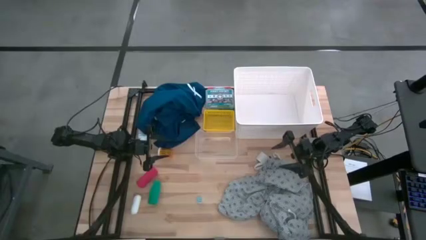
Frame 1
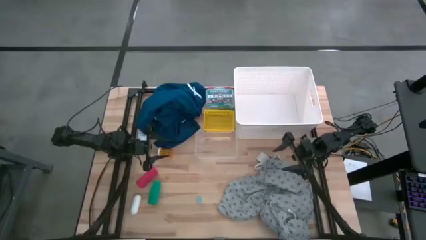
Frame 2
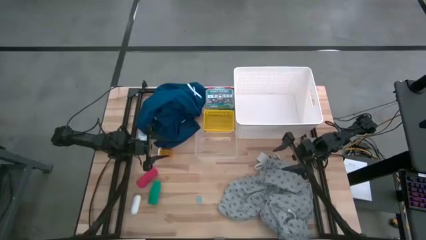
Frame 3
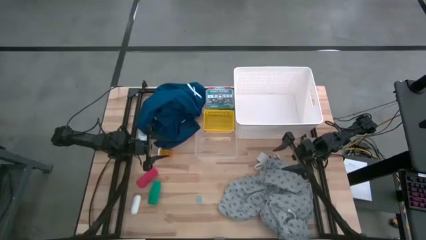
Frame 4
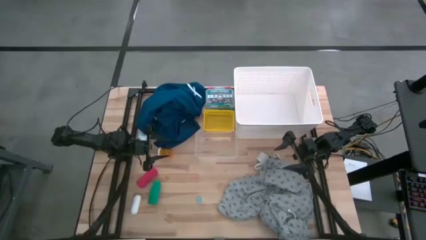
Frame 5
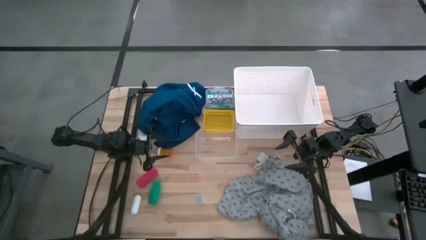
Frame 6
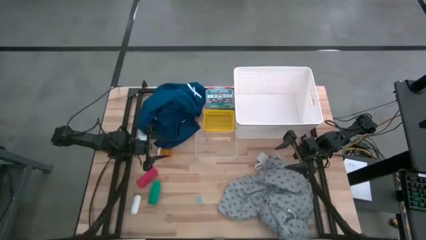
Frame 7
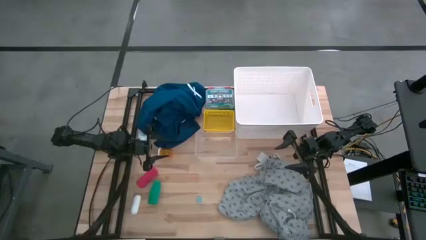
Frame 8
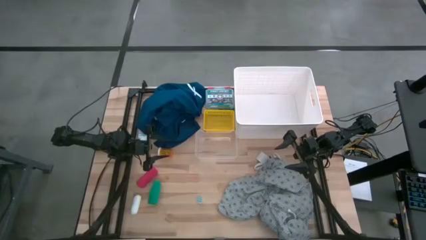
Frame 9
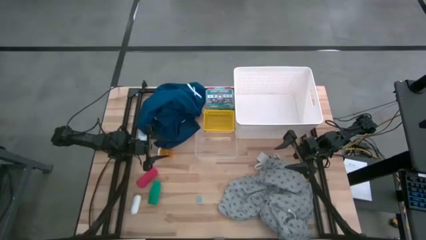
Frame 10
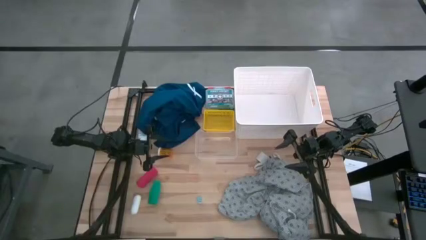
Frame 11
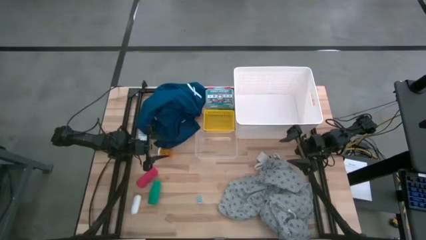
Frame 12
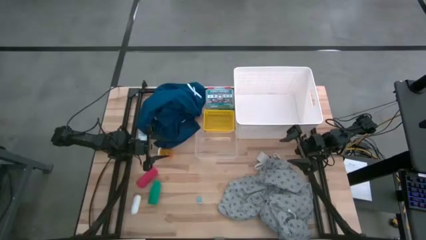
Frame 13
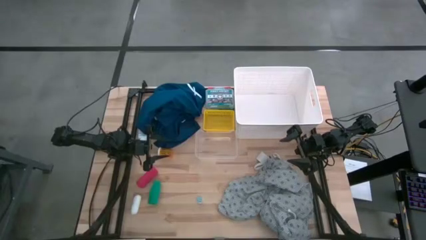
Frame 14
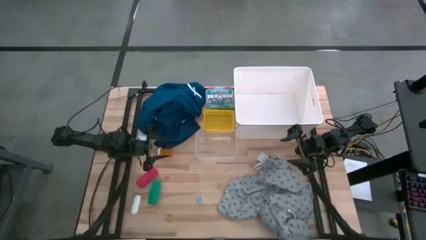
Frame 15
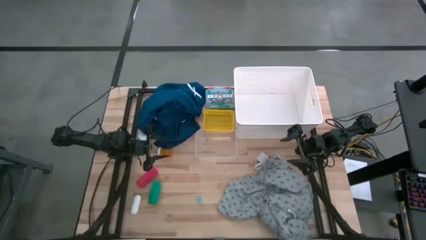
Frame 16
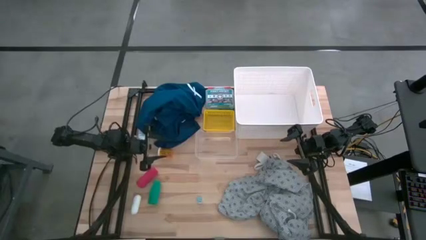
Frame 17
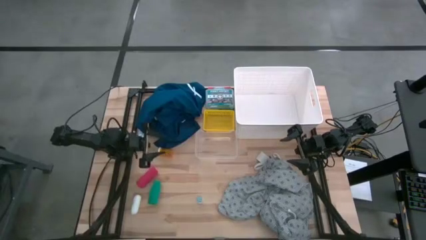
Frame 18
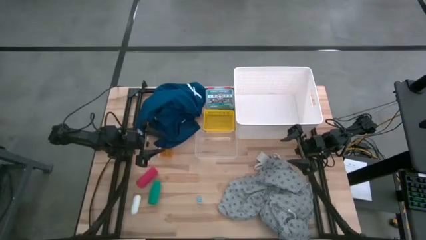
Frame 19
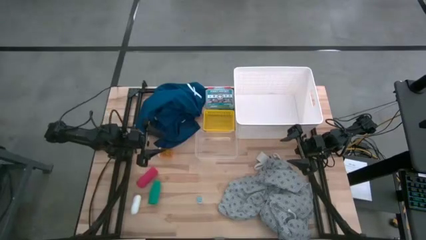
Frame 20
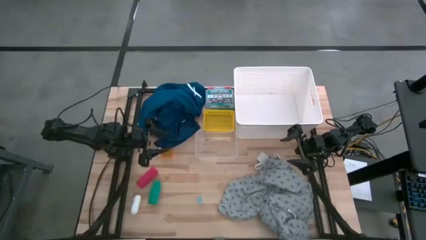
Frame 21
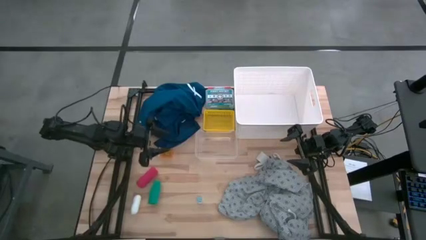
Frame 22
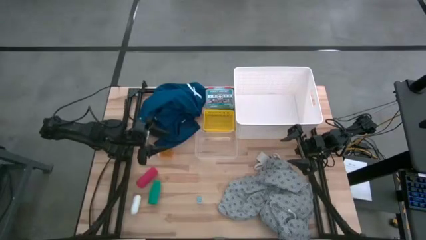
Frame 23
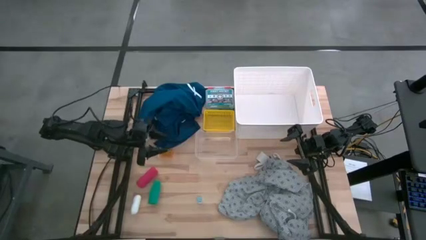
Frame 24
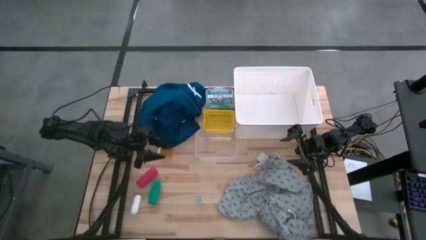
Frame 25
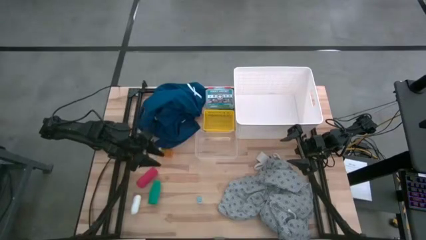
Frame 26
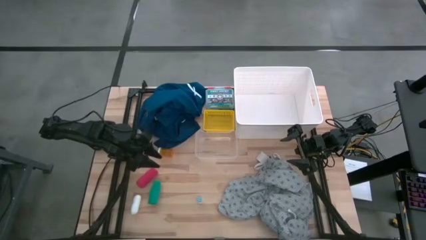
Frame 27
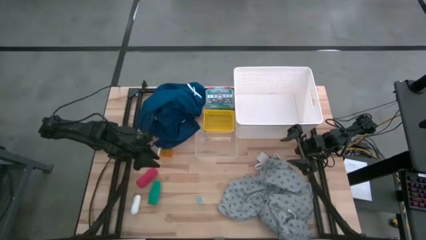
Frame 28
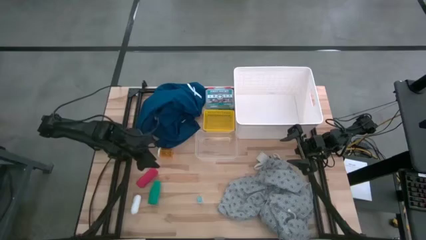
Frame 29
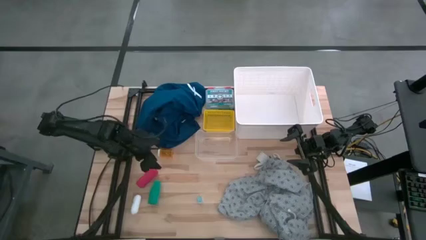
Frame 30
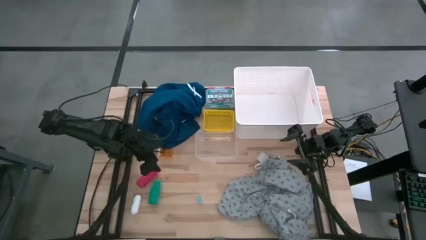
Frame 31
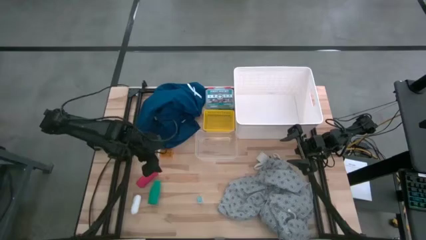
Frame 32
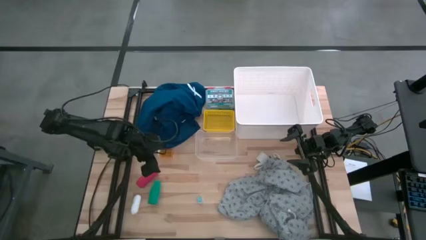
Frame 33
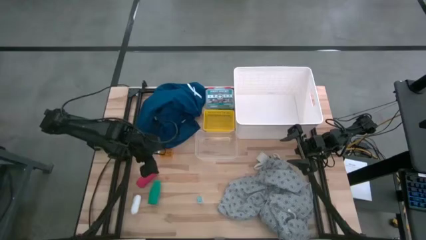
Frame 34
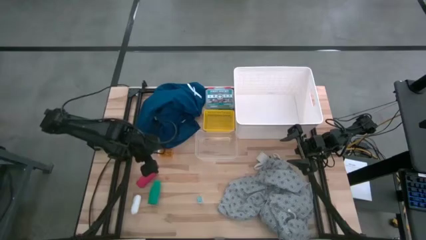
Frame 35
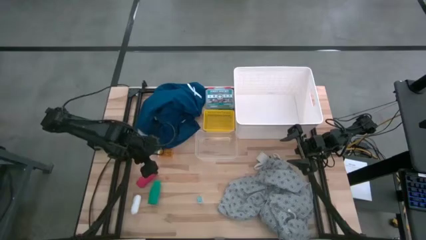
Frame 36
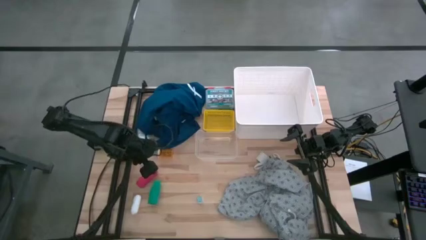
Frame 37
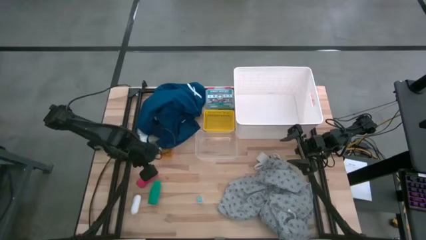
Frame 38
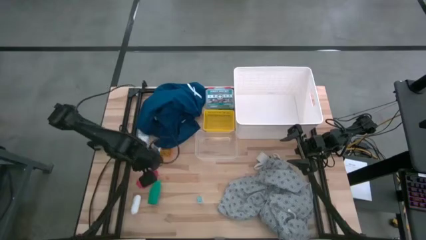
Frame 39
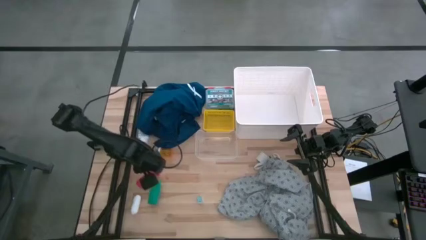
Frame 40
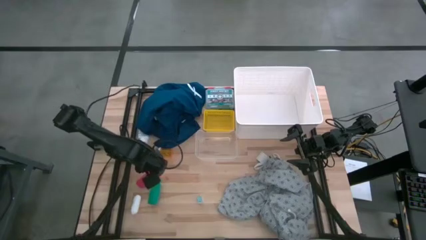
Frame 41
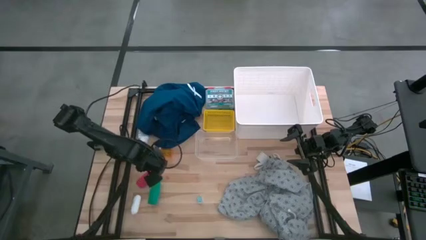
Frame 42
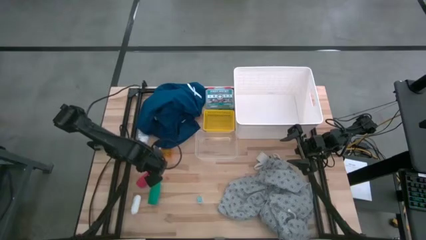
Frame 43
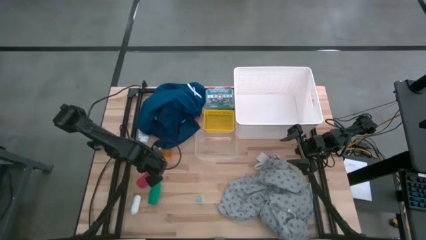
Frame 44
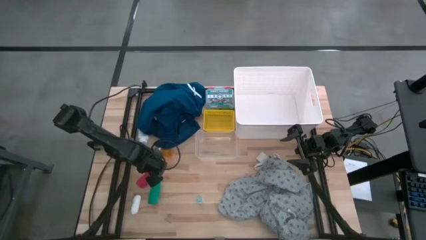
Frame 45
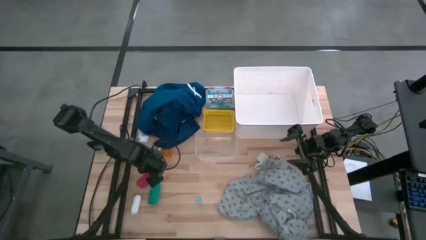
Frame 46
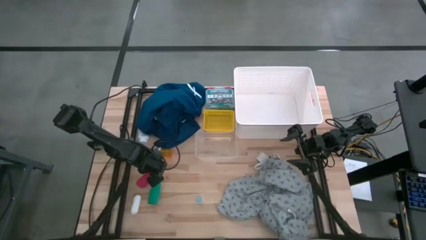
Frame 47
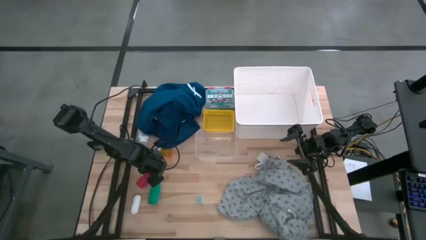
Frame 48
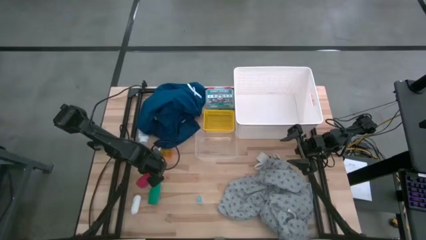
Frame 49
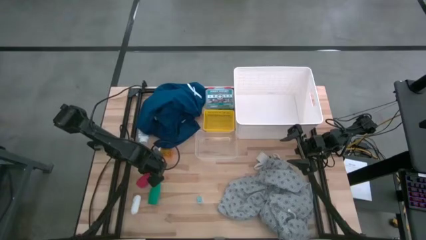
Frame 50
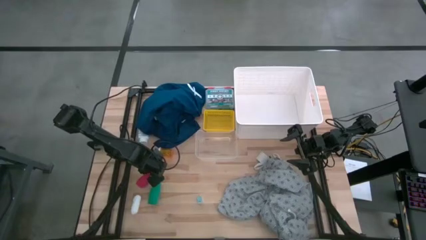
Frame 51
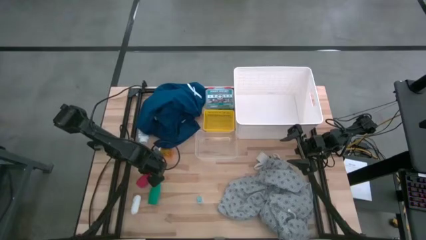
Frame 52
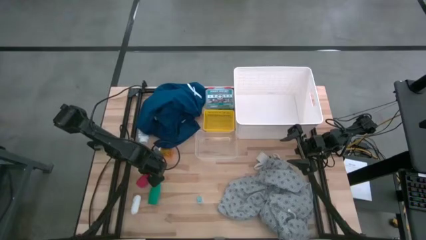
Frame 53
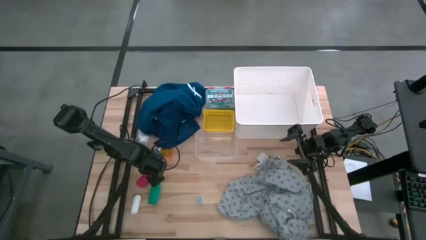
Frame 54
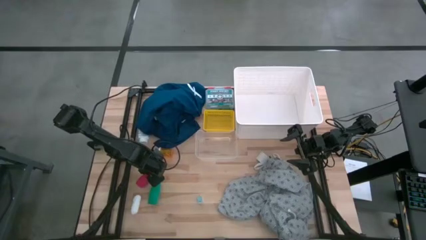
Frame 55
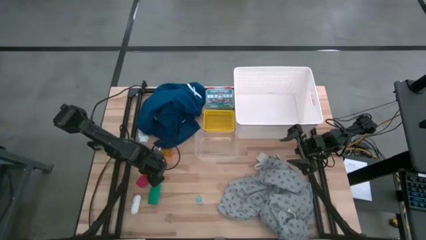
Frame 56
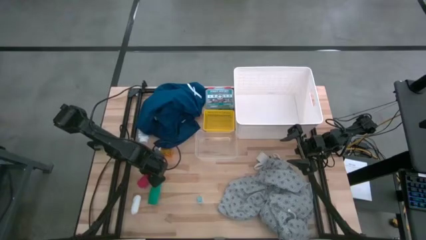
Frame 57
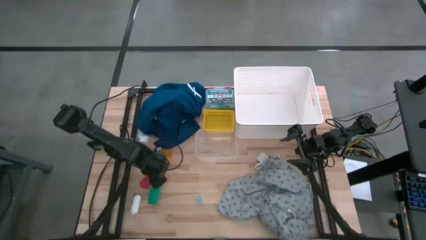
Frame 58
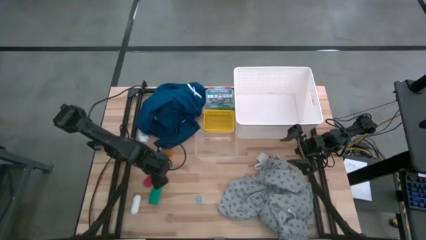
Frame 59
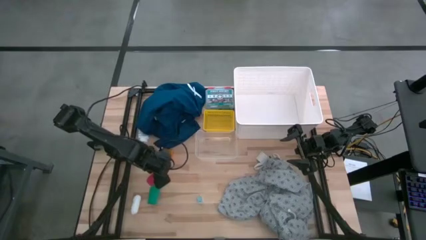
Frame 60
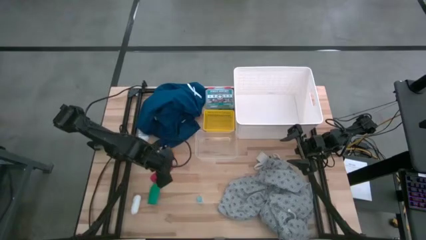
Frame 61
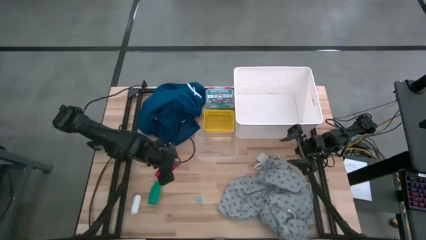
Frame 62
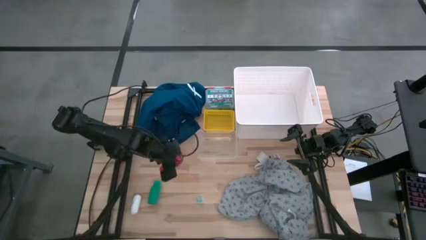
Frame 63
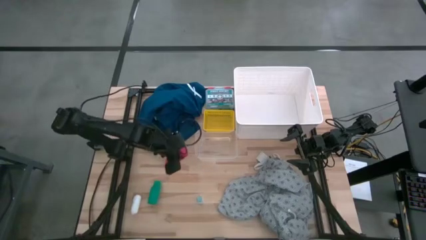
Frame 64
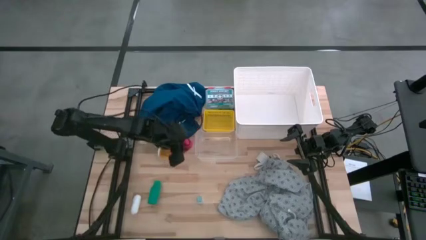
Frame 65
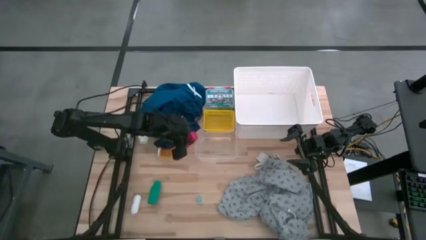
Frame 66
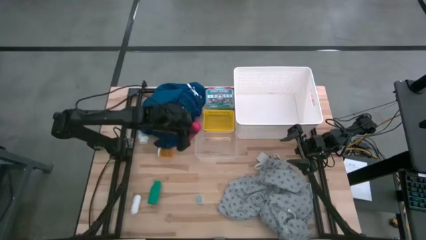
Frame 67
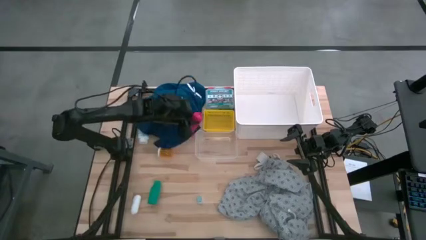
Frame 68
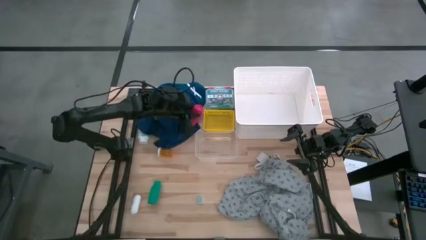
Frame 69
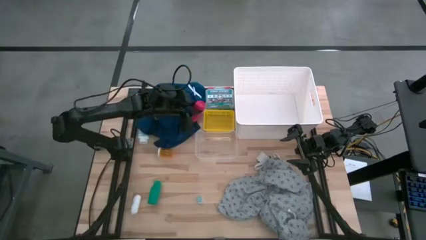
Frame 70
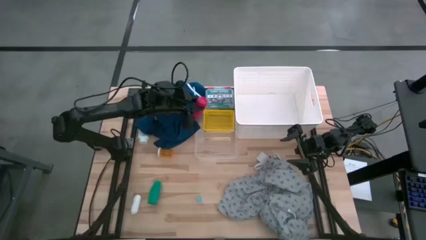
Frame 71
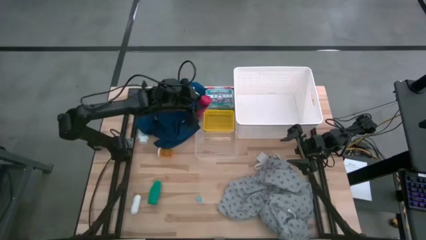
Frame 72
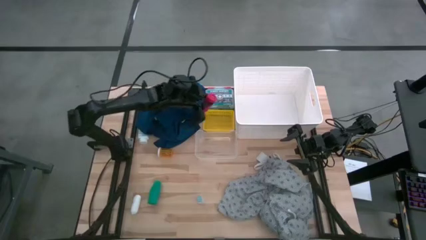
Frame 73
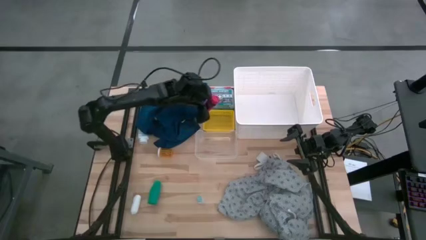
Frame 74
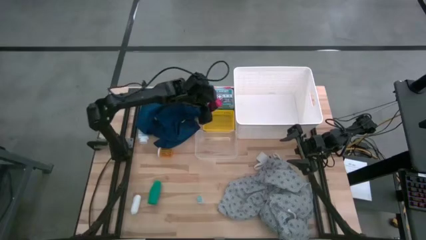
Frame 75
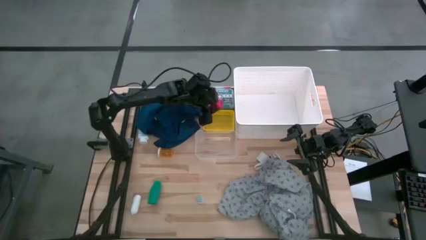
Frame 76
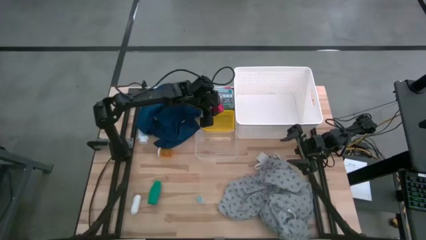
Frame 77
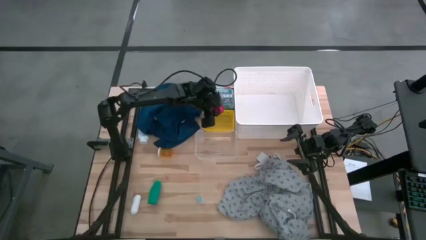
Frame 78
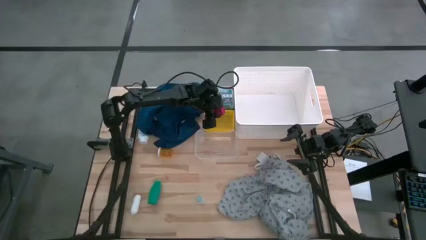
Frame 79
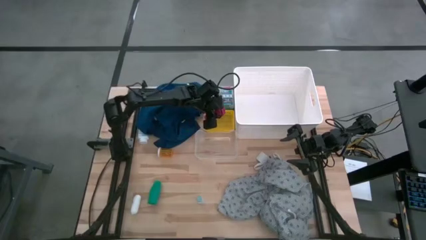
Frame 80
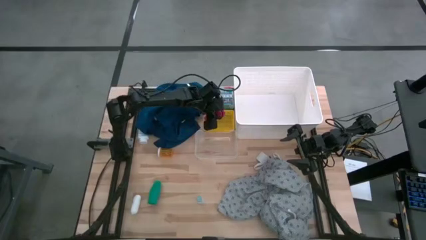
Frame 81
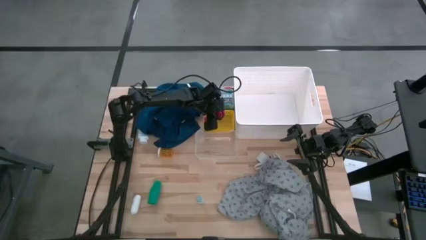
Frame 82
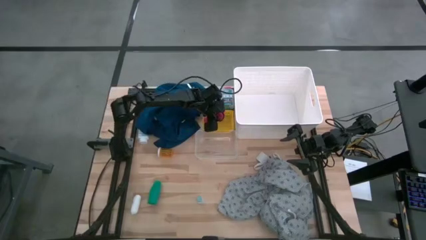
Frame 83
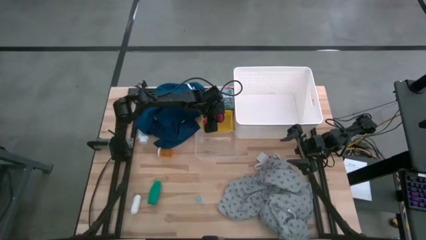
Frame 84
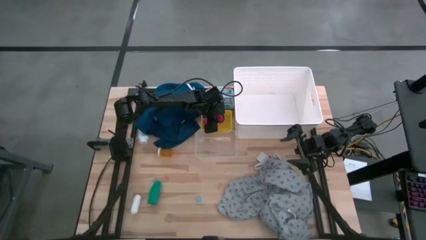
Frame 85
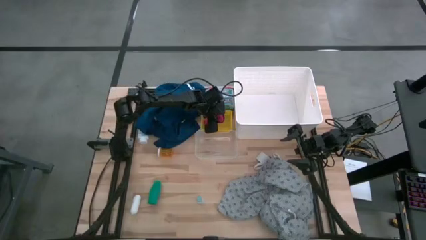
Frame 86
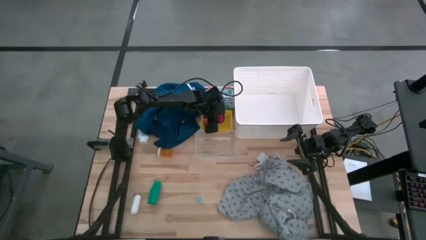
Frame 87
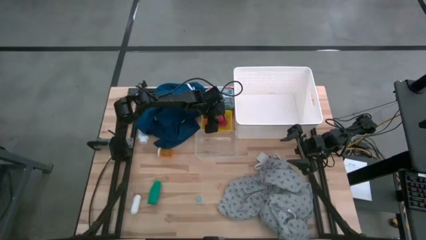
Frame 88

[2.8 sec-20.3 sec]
Task: Pick & Place Medicine items
Put the red bandage into the yellow bin
